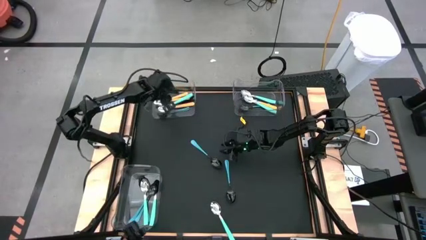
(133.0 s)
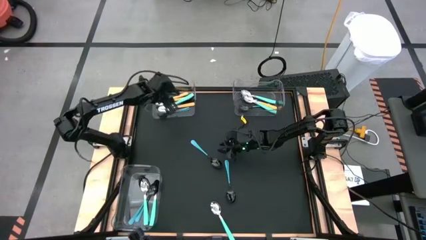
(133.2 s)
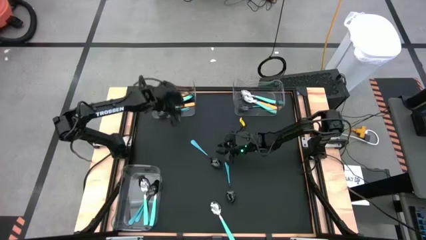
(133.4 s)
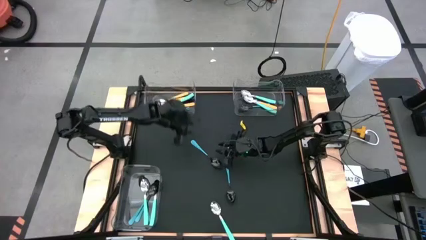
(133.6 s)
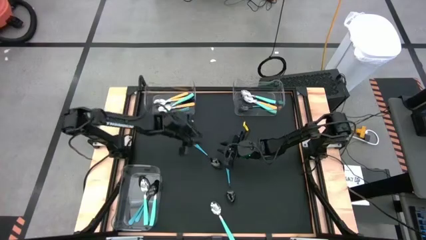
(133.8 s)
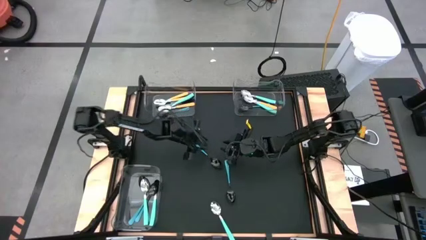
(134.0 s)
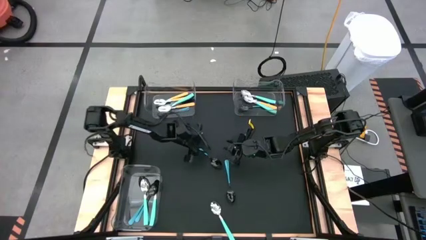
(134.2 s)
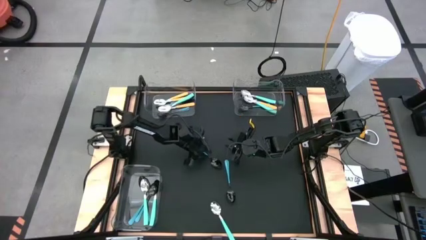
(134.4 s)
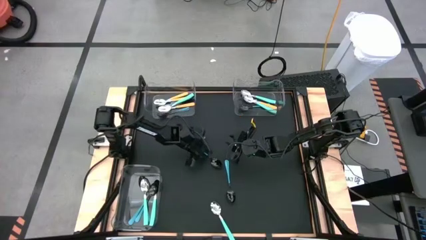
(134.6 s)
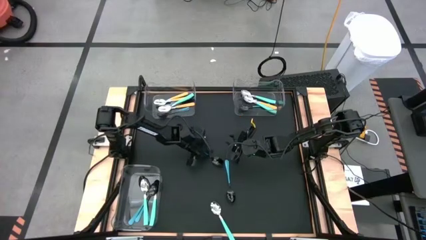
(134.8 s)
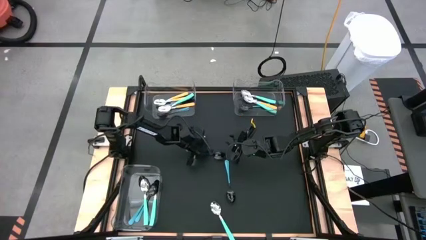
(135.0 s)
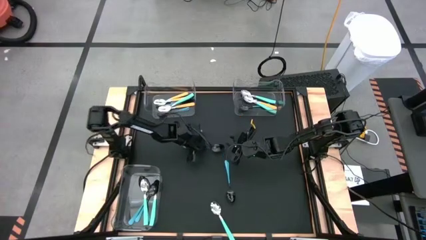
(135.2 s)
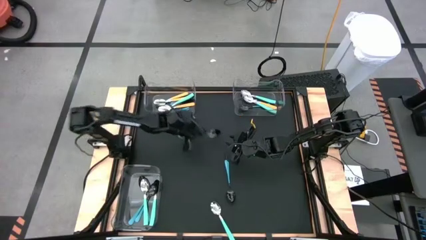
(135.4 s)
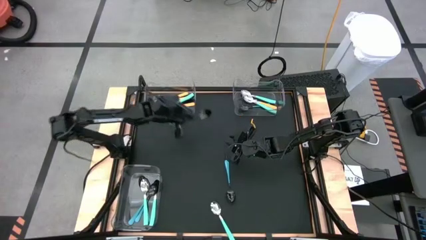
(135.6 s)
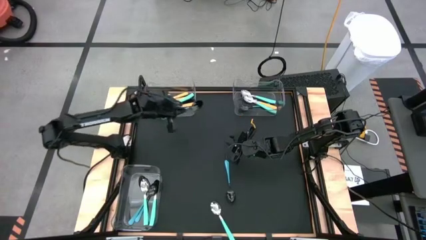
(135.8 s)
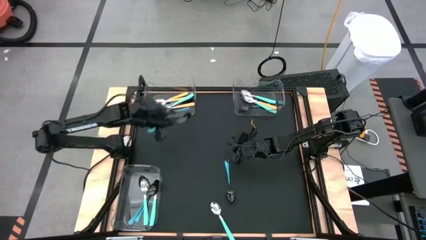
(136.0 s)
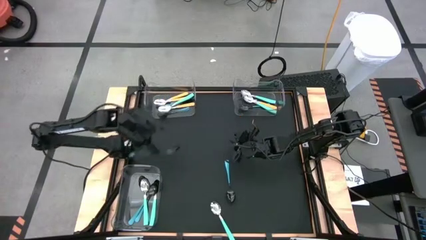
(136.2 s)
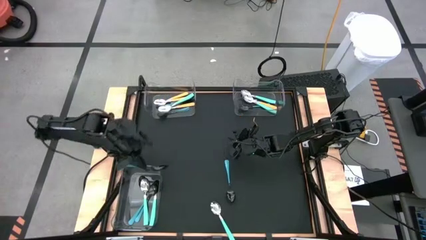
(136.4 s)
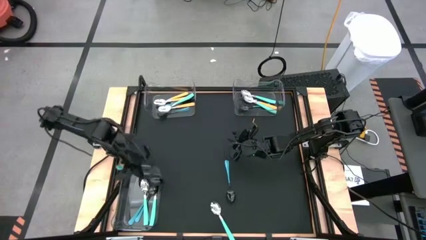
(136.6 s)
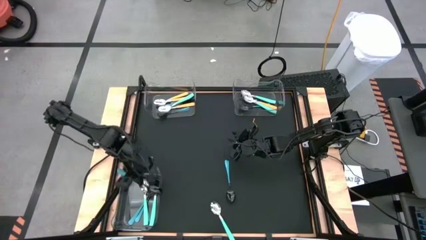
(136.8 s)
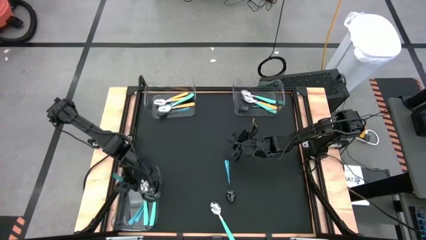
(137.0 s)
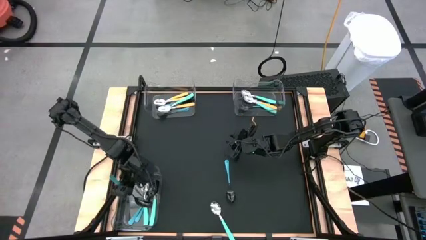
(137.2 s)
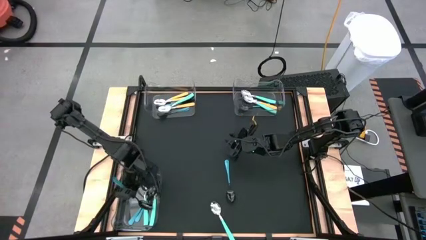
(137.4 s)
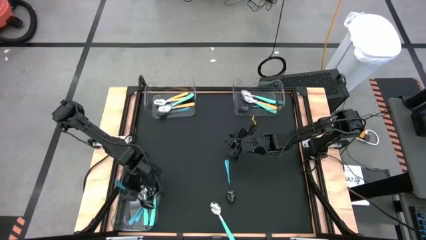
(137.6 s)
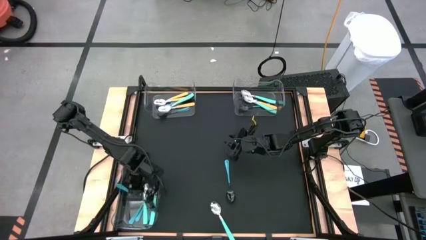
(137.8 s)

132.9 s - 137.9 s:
Task: Sort silverware by color (type)
Put the blue spoon into the bottom left transparent bin

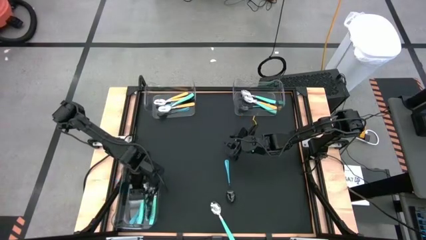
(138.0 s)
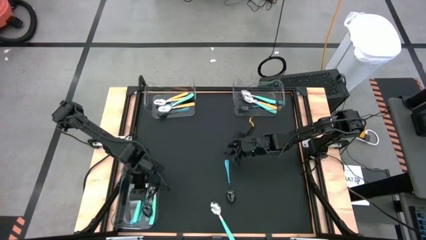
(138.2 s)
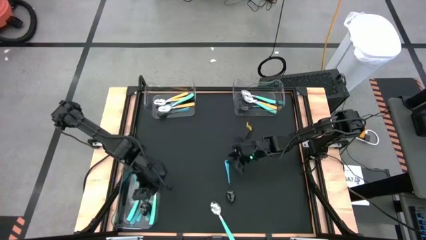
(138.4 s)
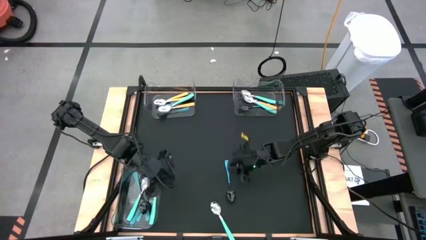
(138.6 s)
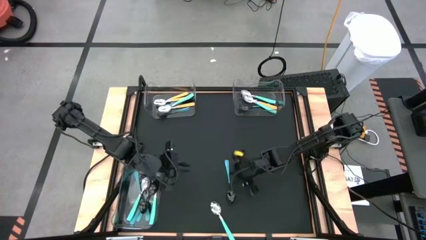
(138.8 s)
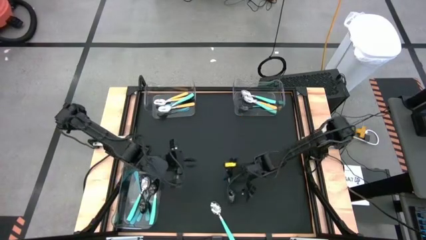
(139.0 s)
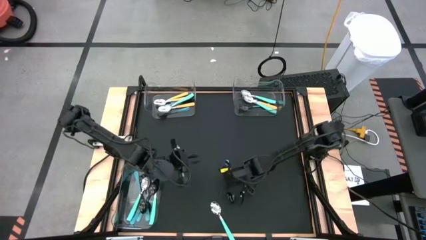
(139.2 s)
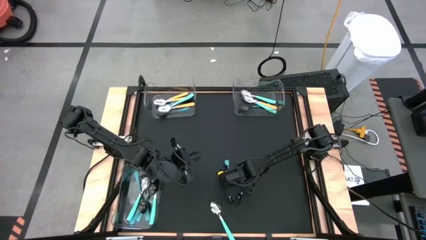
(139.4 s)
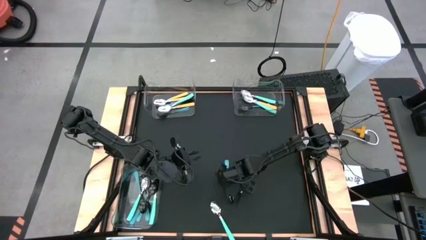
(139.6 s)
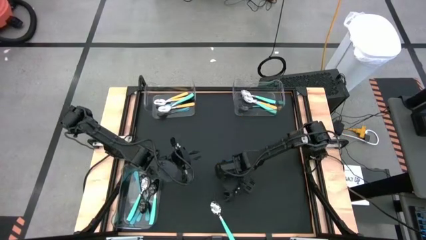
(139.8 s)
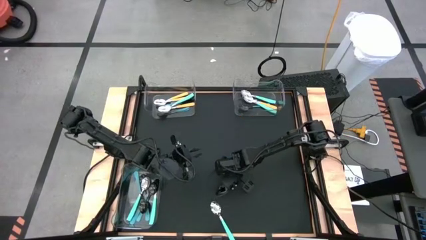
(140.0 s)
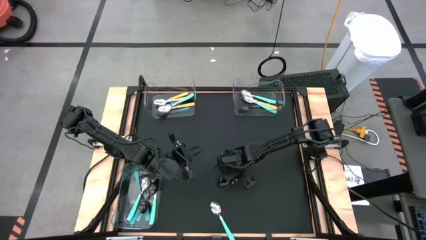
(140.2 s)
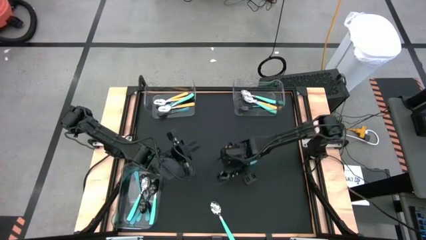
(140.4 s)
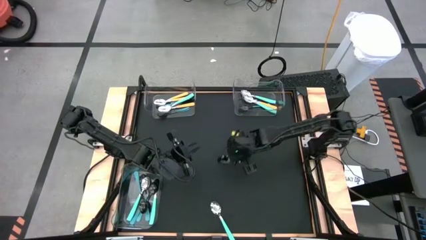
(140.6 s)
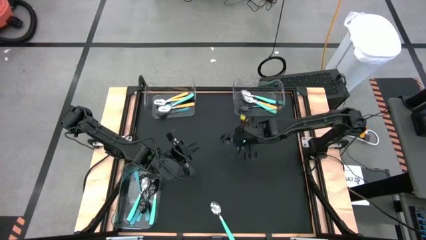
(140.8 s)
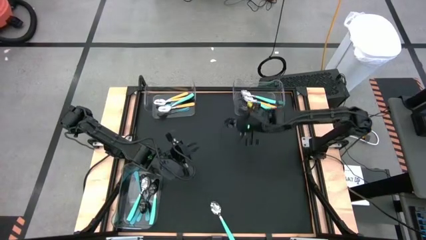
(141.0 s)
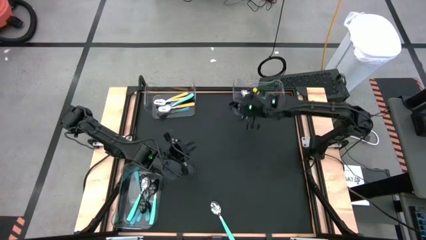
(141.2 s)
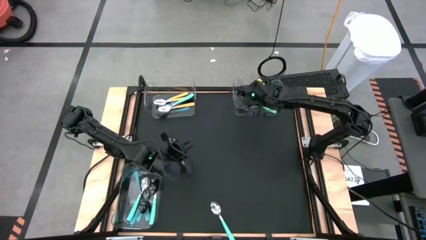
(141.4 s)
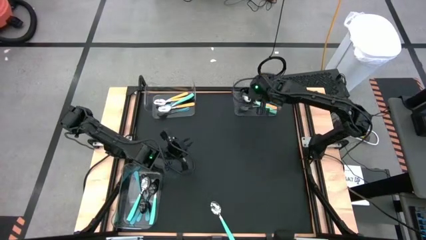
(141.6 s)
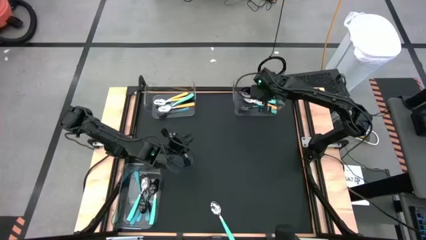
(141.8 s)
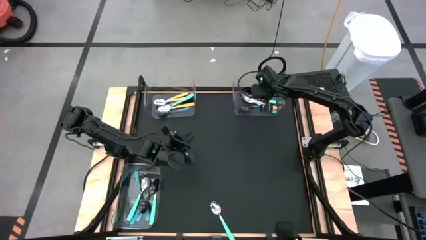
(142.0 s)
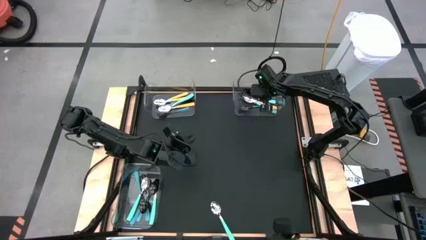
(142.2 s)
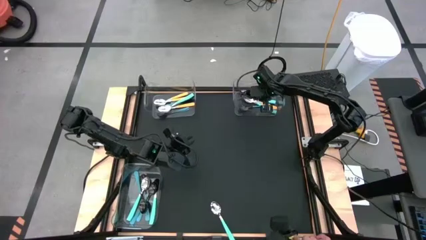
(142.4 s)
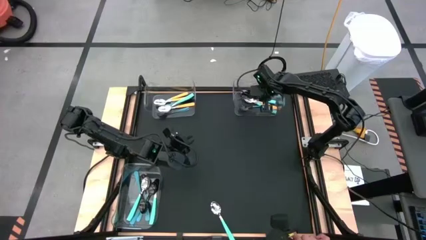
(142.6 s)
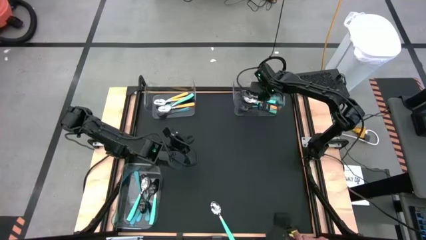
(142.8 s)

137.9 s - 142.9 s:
Put the blue spoon into the top right transparent bin

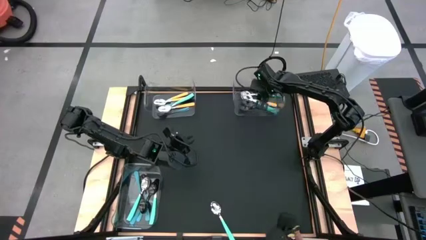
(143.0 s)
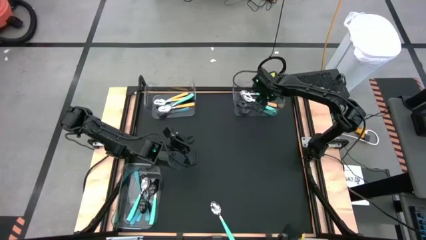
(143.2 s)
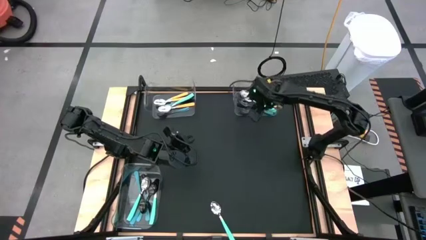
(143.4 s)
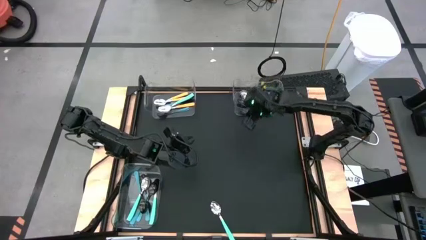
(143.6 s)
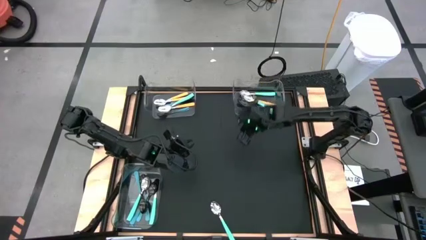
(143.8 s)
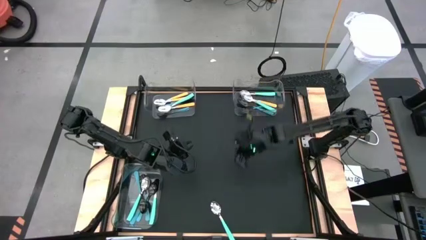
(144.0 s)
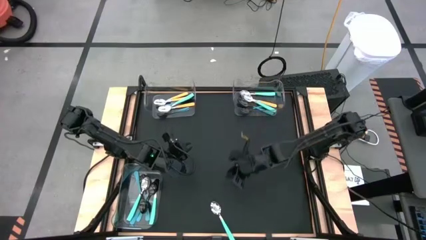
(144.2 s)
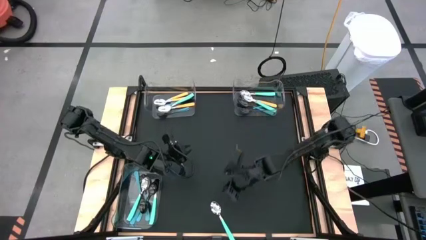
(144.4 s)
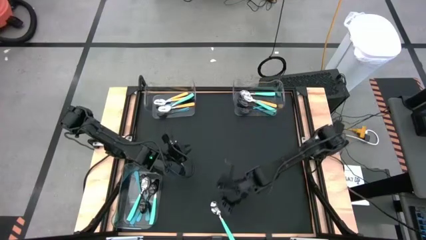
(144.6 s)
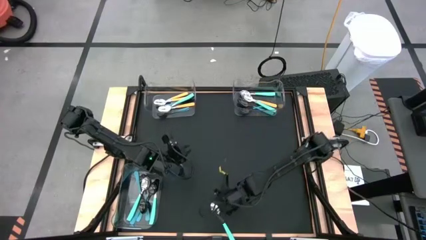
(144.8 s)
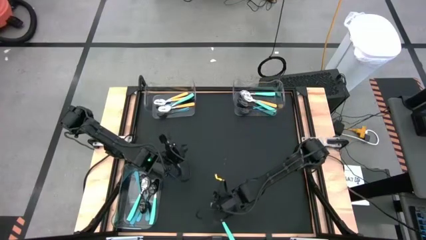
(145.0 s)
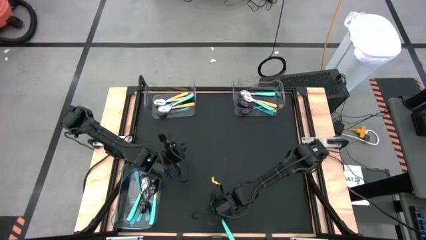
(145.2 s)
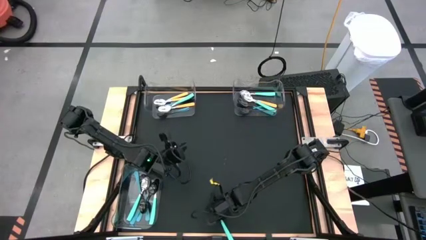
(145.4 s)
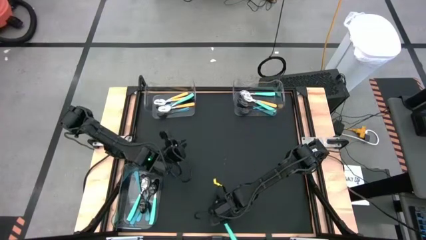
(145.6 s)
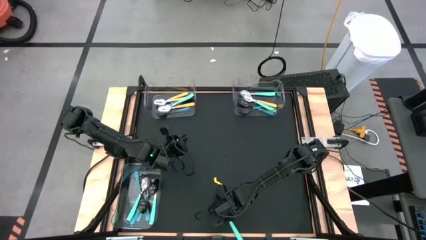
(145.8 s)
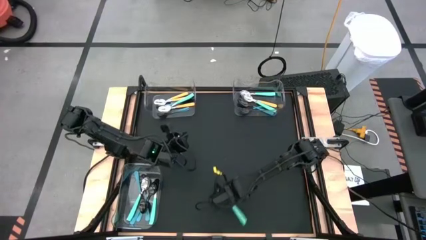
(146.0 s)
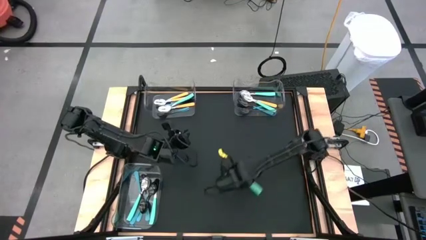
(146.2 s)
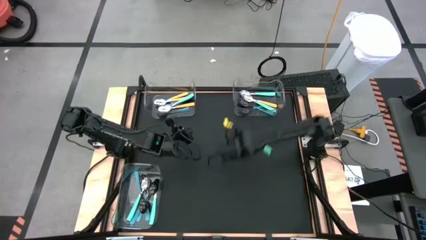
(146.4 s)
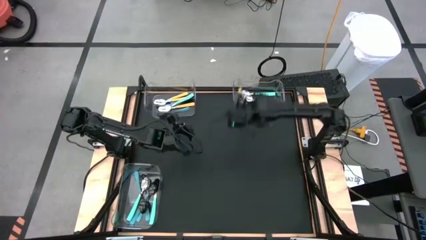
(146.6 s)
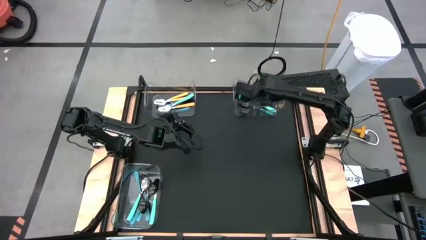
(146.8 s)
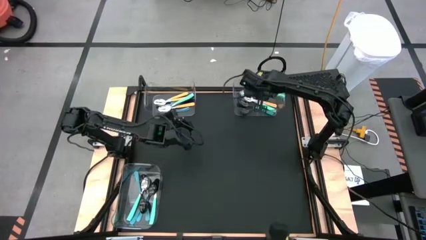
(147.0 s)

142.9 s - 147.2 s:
Put the green spoon into the top right transparent bin

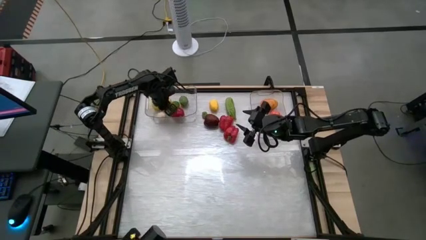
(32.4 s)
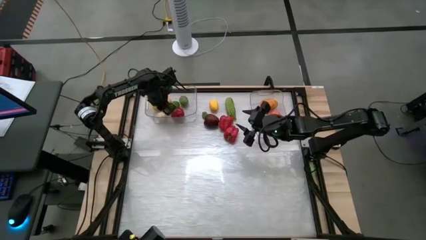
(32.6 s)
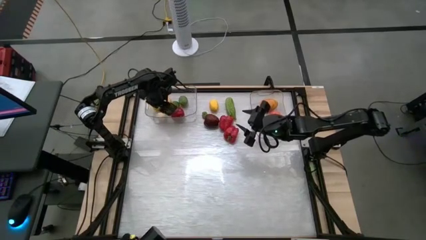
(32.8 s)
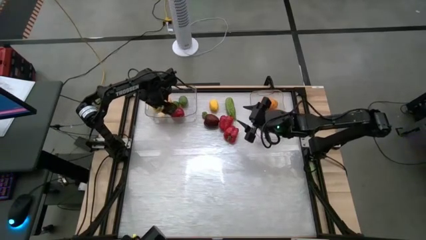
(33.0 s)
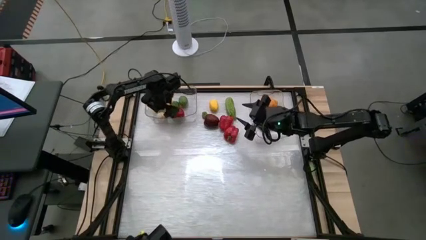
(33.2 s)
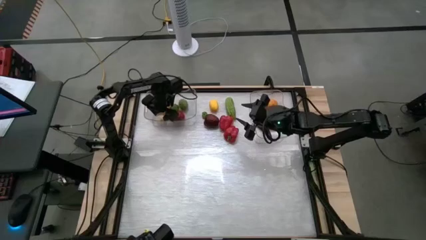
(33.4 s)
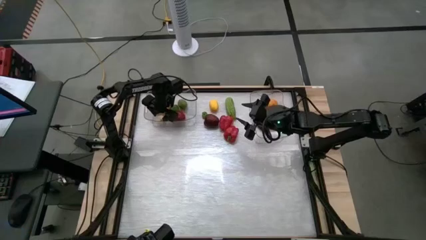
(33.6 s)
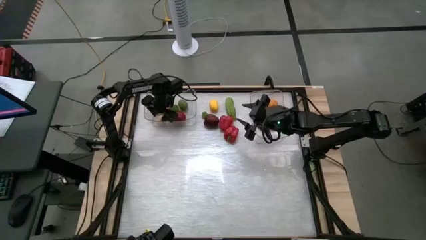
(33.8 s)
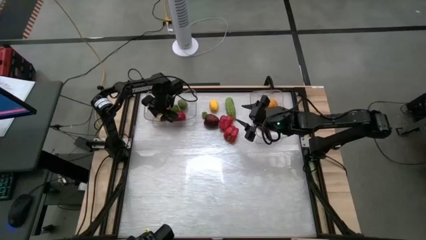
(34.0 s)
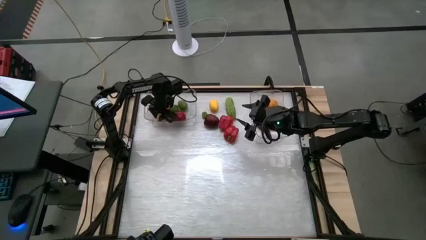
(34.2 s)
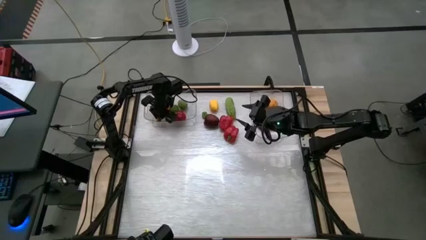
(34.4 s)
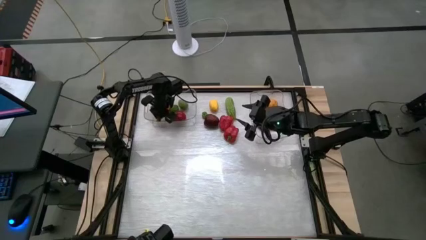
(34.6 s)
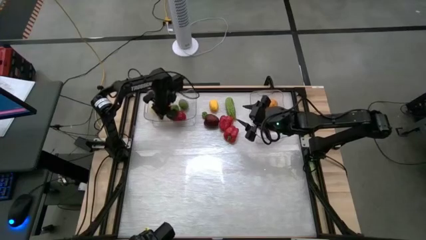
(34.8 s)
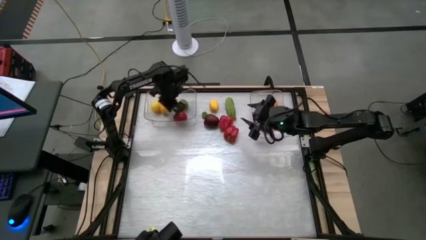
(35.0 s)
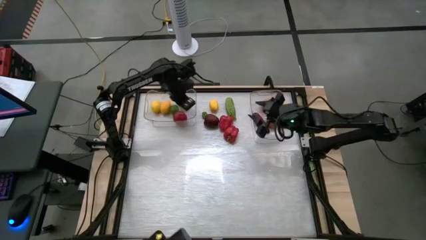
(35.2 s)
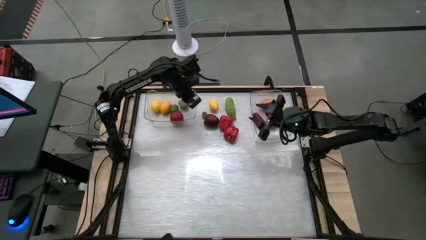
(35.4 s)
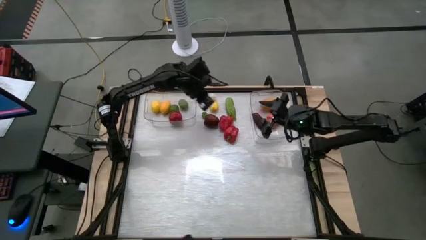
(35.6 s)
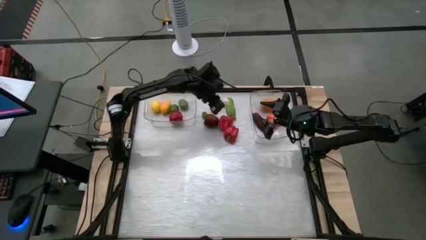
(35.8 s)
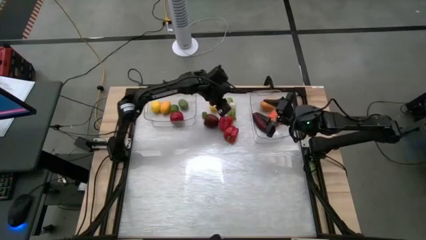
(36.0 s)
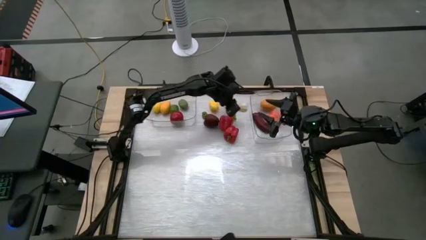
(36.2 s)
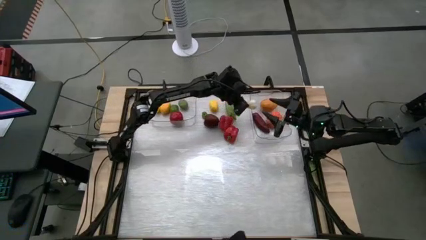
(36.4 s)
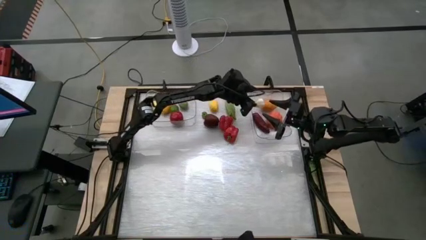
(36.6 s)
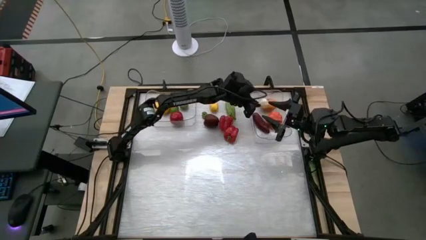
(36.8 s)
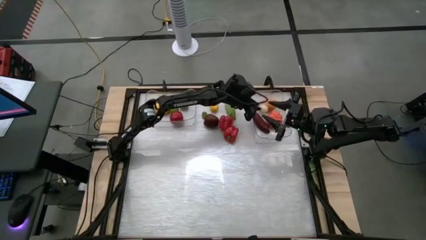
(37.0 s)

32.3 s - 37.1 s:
Task: Sort produce into baskets
Put the white garlic into the right transparent bin
